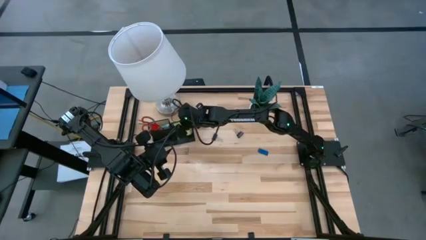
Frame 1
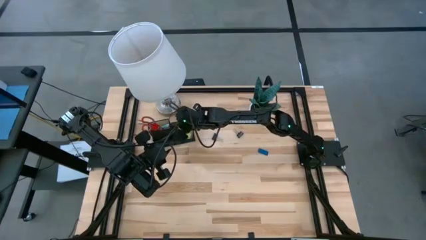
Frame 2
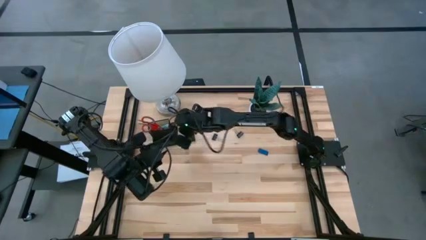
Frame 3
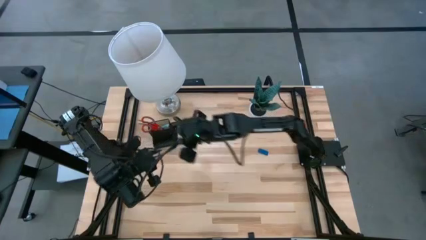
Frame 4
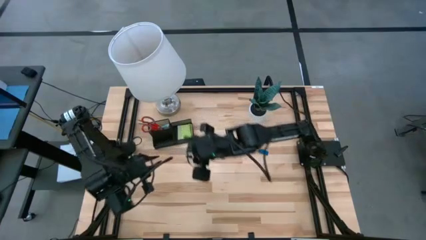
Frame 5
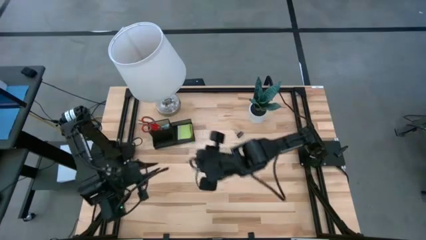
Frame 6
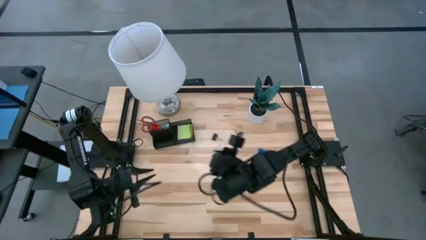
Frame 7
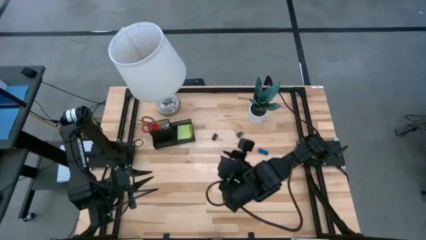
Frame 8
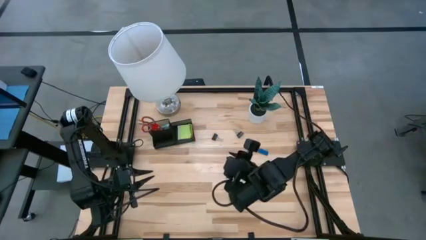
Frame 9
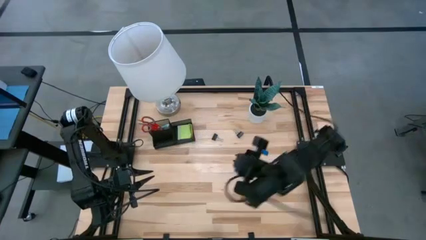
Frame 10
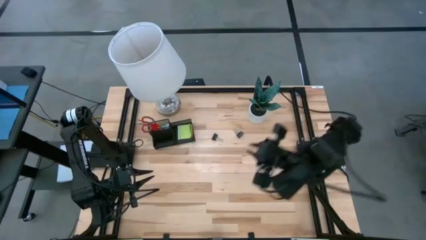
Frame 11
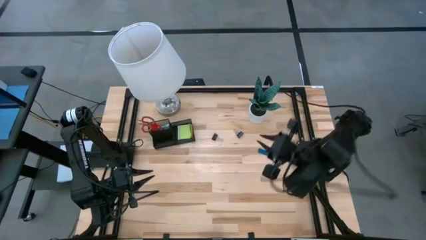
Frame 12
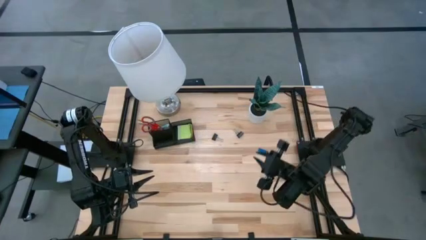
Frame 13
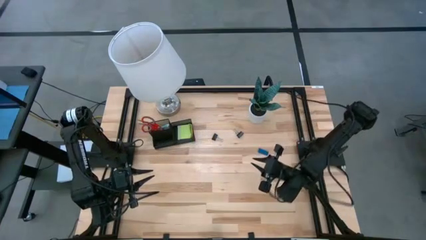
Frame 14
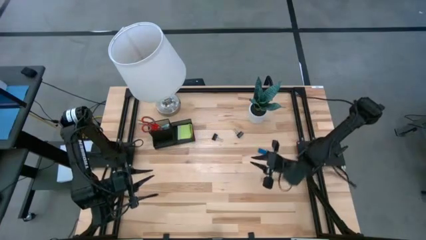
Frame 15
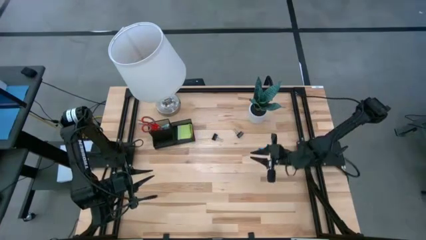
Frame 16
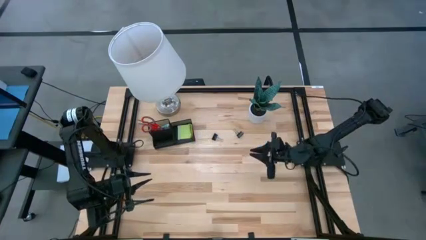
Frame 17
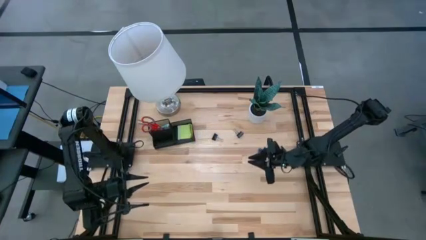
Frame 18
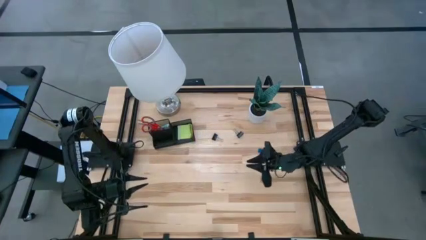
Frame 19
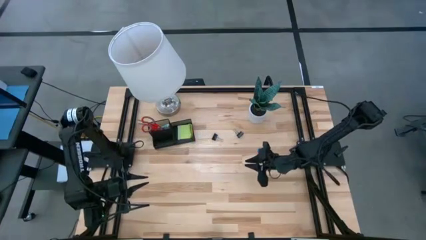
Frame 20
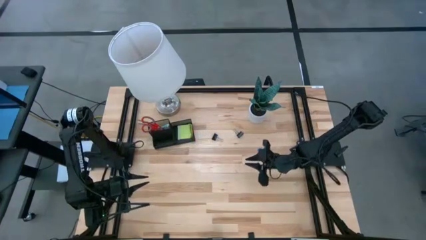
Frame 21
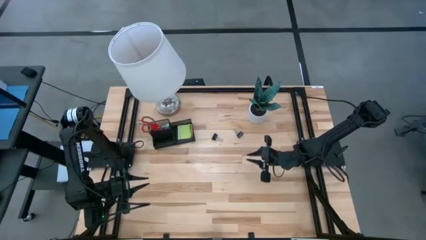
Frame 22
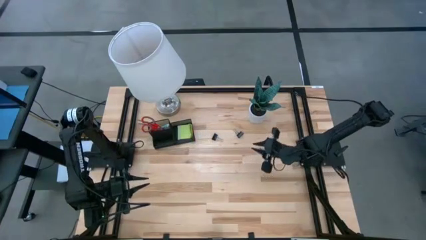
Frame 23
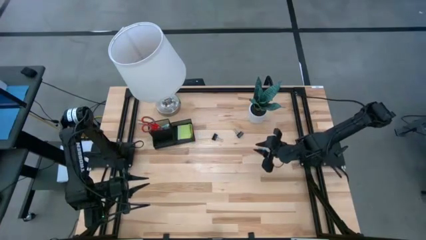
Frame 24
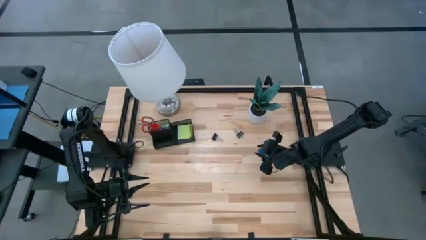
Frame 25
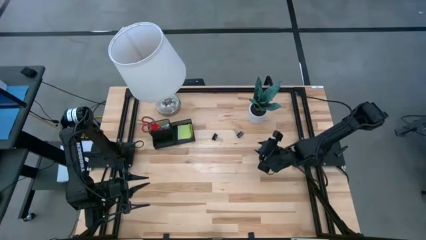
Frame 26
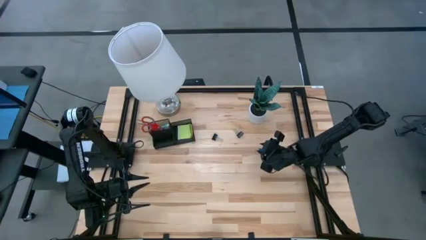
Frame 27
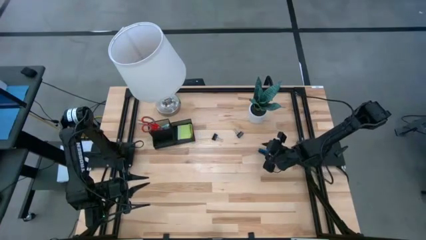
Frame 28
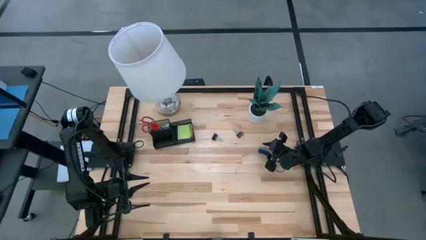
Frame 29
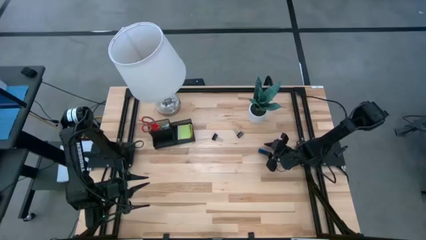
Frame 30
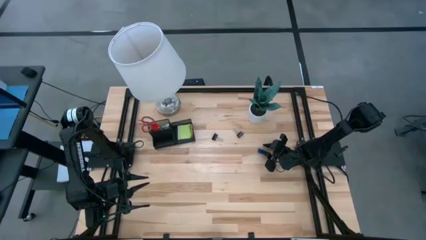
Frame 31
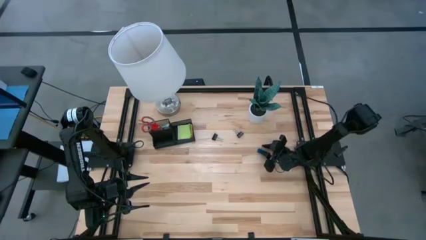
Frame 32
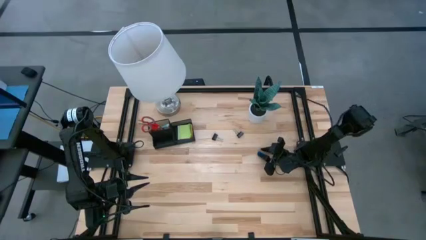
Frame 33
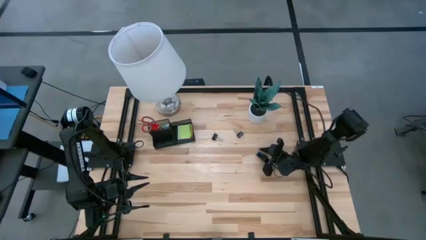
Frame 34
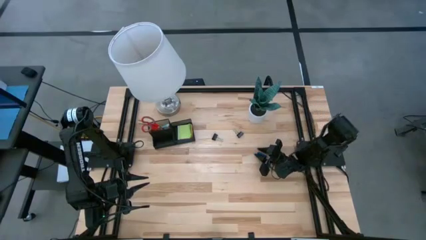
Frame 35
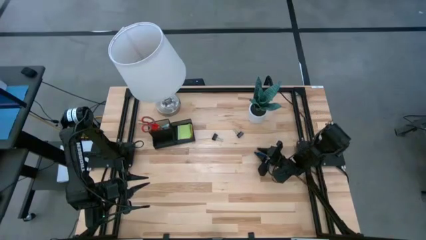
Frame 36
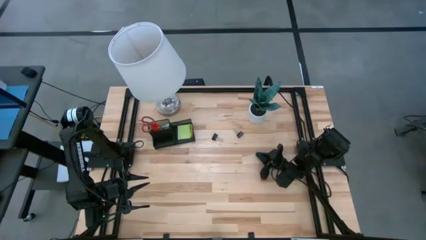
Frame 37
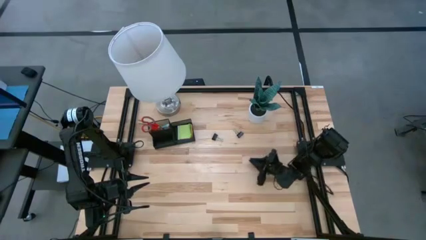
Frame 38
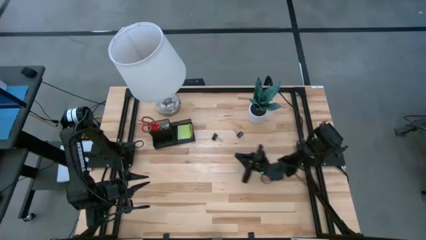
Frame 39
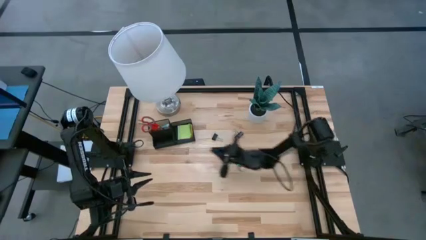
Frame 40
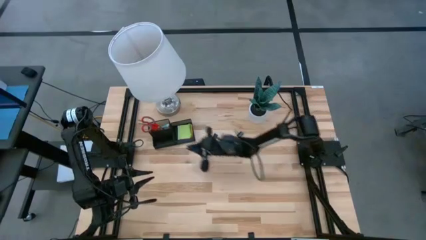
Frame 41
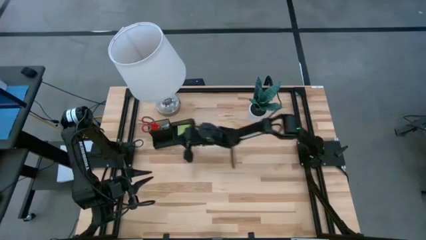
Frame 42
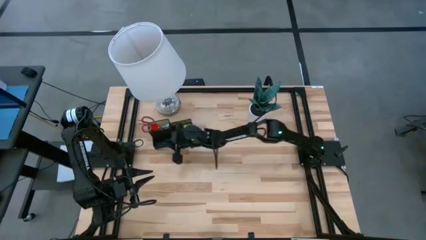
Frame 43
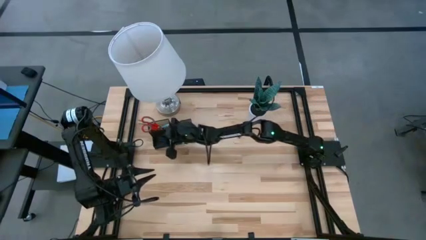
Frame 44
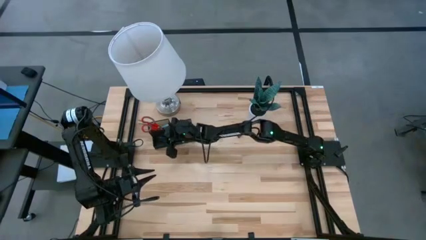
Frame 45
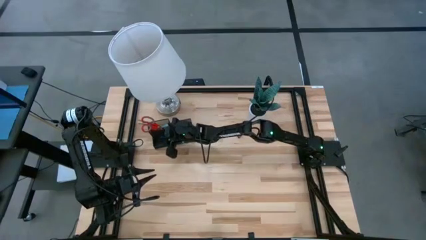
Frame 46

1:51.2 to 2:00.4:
Task: Pick and place office supplies into organizer
Put the blue eraser into the black desk organizer

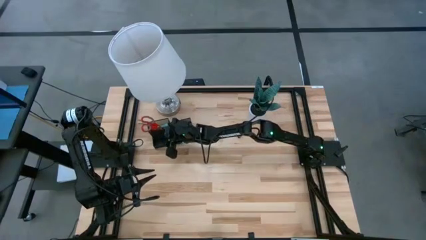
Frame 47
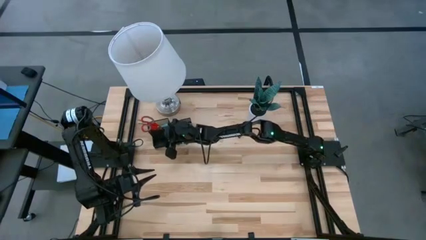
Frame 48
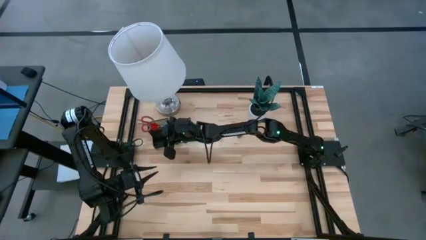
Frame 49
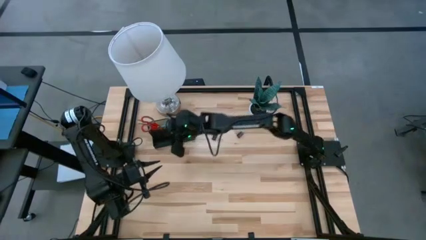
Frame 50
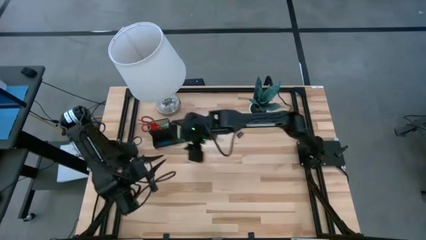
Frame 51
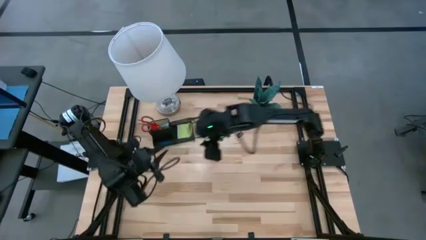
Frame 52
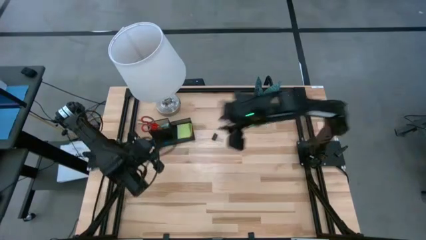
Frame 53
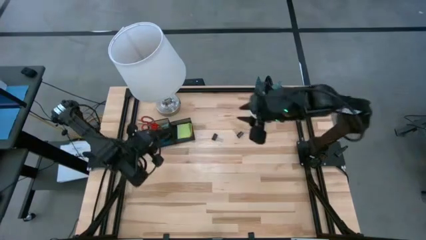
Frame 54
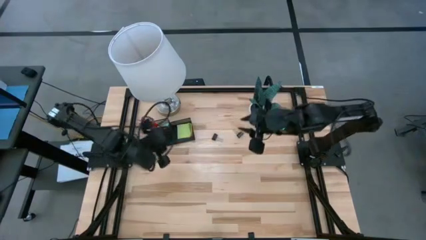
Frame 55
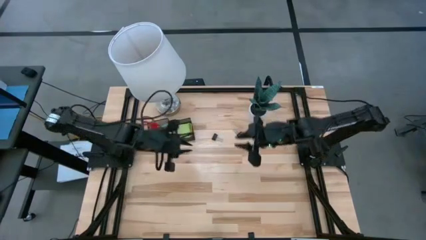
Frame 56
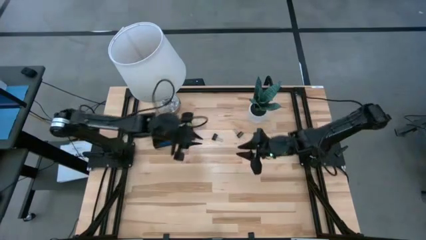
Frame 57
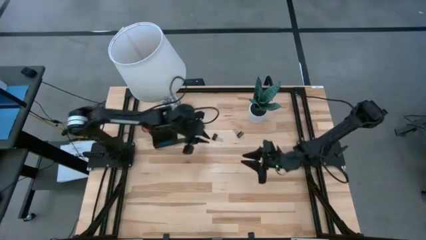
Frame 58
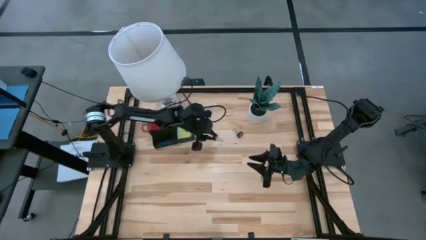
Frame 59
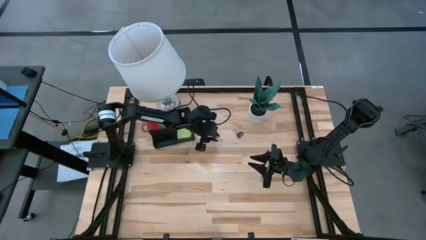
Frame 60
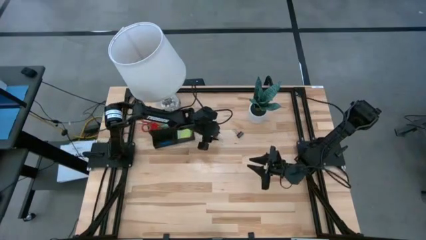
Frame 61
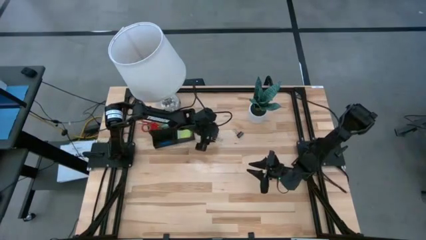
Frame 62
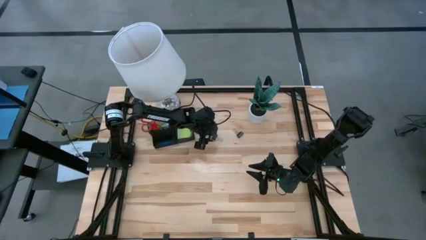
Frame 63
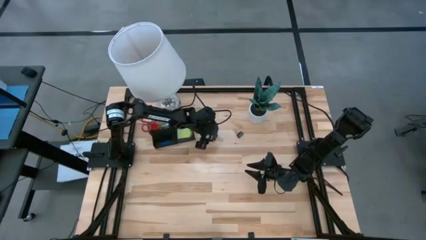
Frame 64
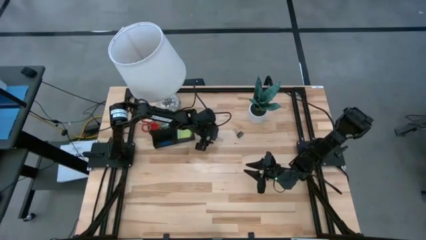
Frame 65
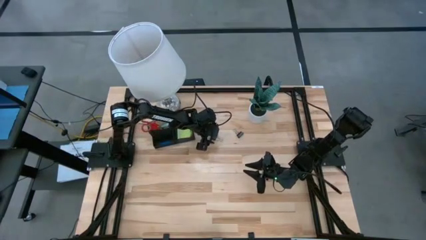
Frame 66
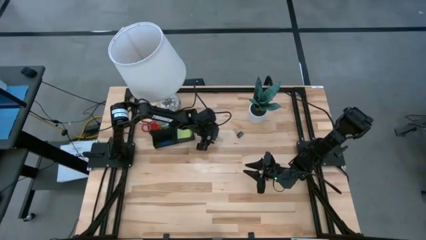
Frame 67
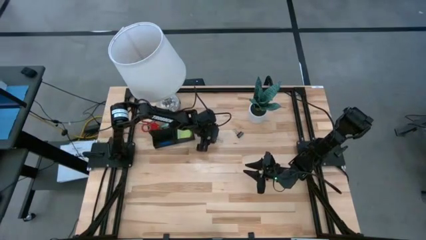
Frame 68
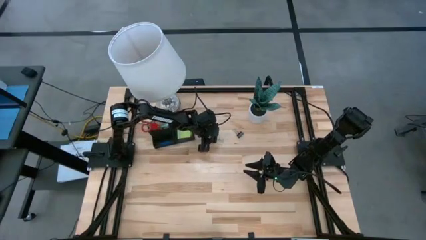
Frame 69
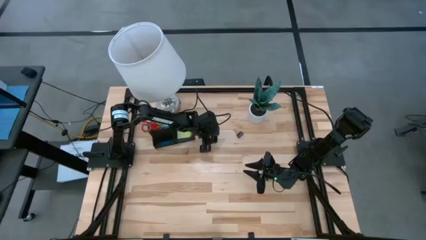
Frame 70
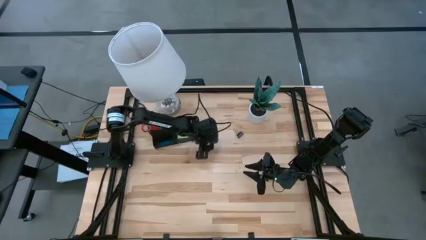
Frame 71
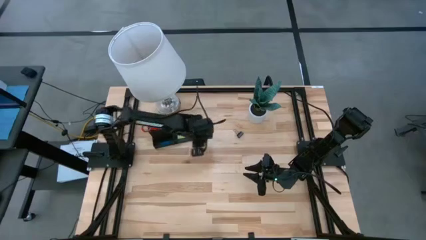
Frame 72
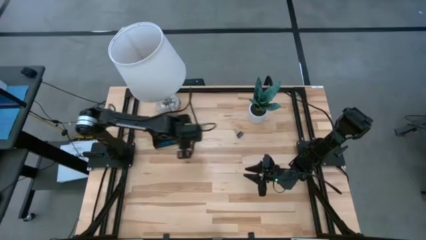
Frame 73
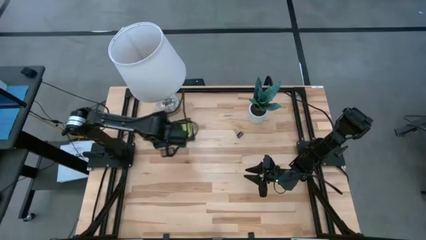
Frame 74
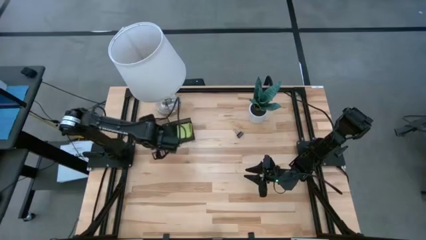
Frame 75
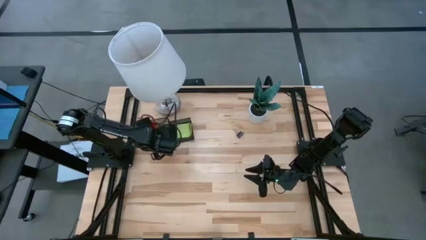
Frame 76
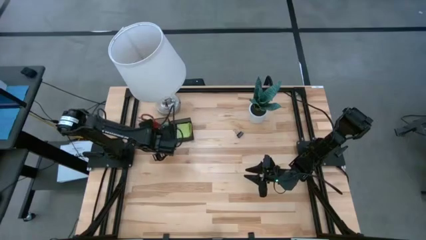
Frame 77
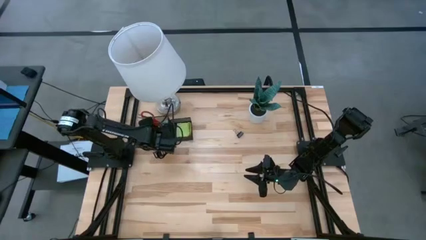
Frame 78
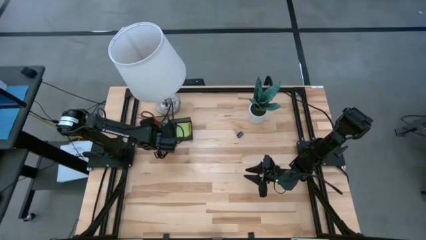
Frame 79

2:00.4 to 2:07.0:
Put the left black binder clip into the black desk organizer

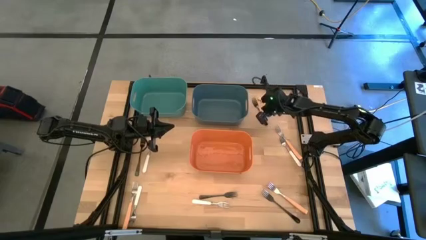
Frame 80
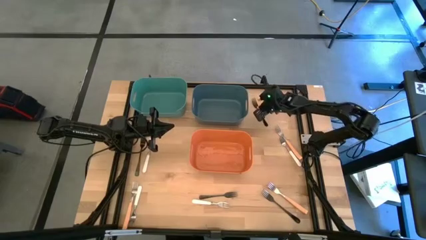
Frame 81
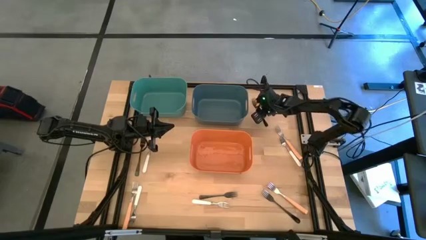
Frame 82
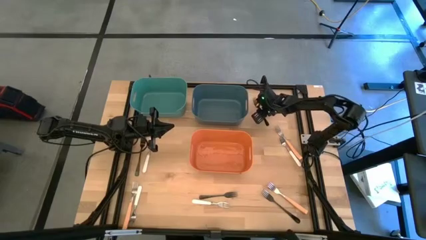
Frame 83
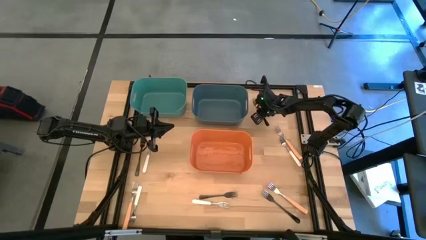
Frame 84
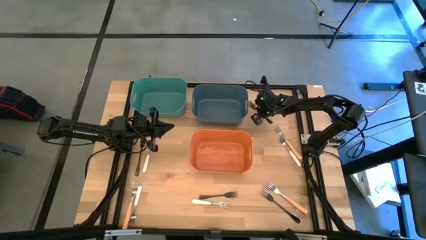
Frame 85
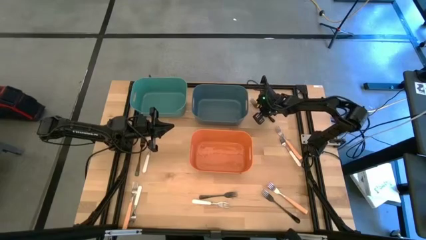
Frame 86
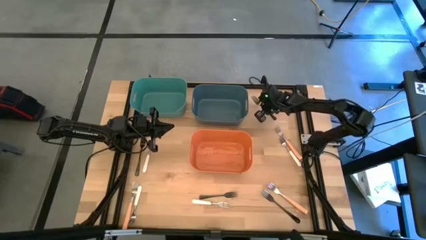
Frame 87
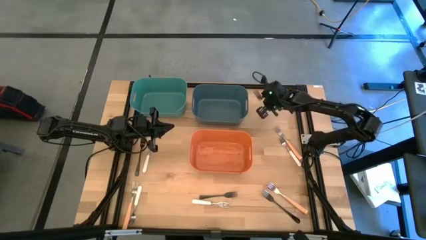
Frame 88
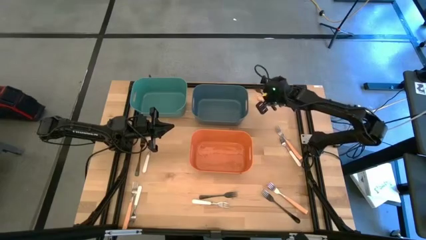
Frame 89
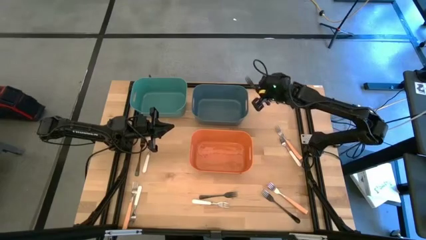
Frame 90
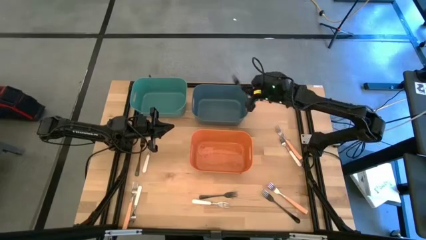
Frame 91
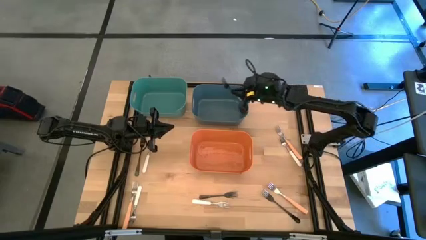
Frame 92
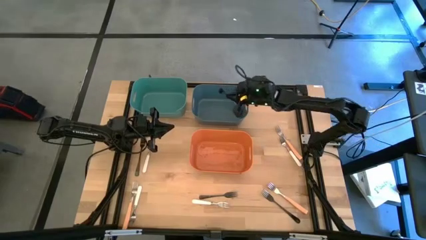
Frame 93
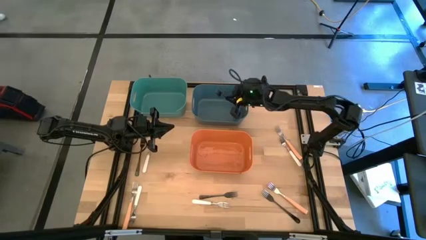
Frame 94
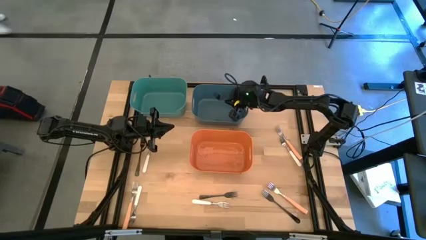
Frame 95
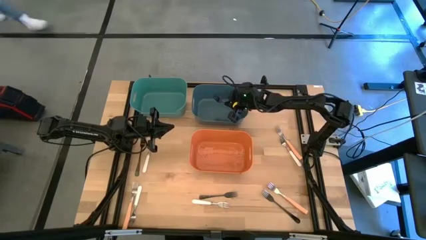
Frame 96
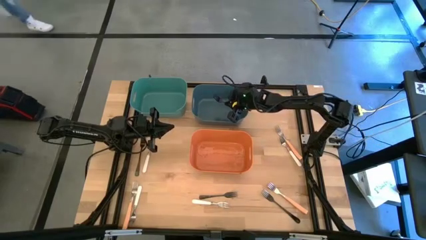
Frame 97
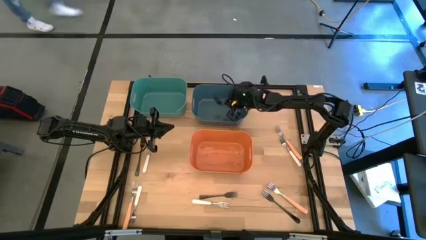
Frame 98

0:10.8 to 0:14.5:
Task: Sort silverware by color (type)
Put the black fork into the blue bin
